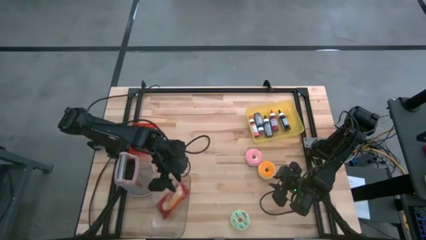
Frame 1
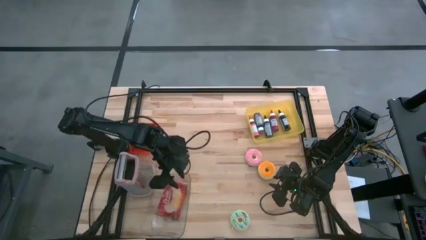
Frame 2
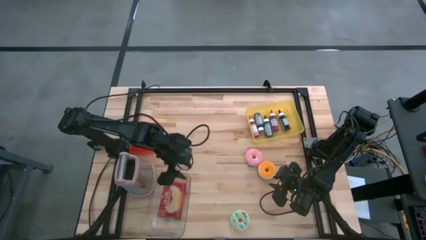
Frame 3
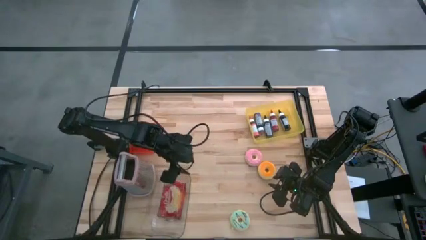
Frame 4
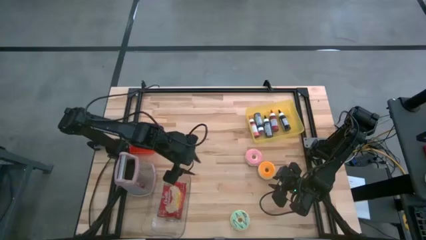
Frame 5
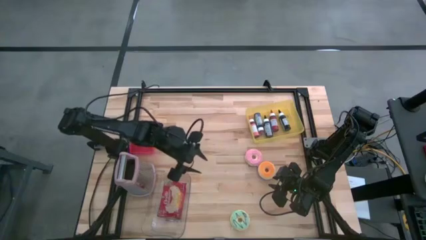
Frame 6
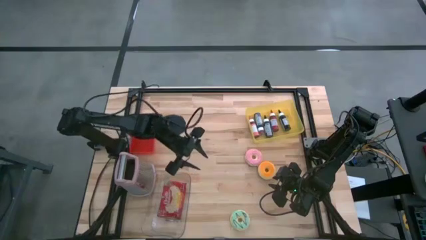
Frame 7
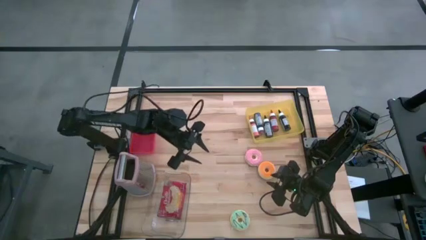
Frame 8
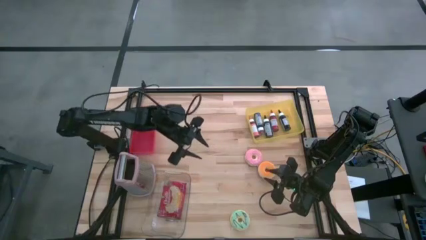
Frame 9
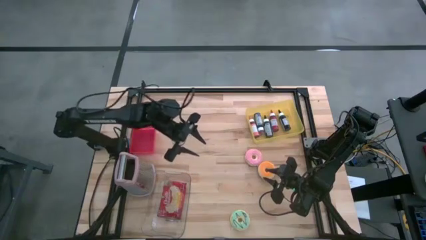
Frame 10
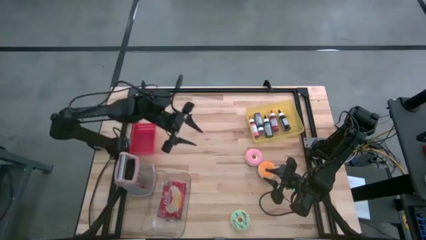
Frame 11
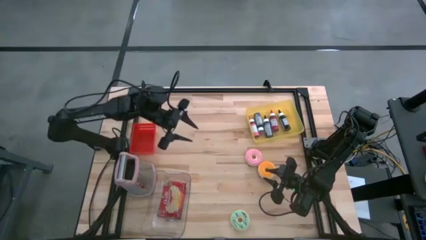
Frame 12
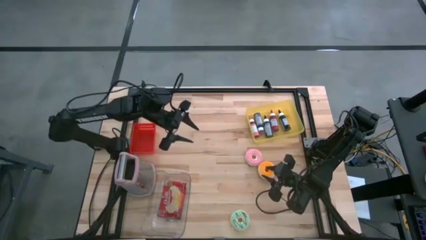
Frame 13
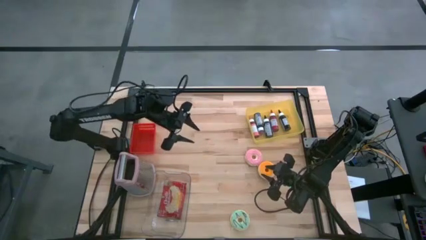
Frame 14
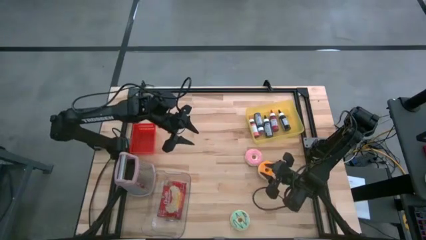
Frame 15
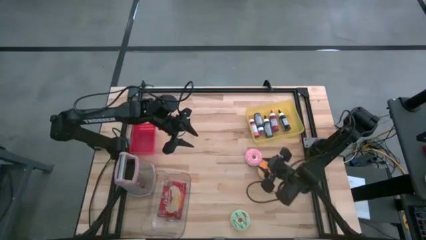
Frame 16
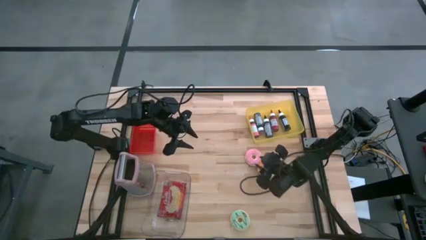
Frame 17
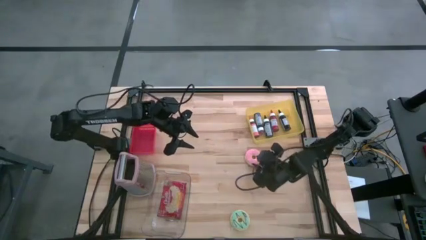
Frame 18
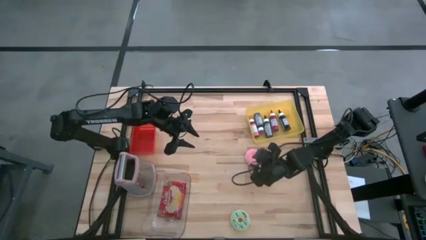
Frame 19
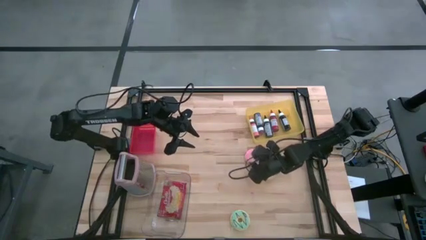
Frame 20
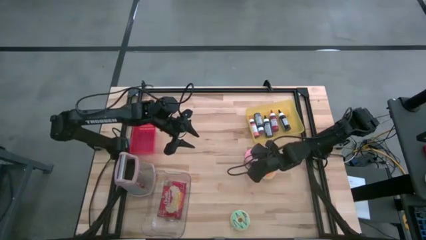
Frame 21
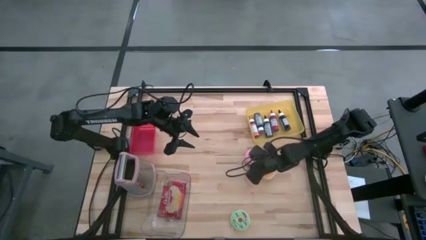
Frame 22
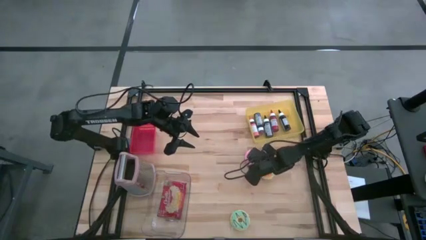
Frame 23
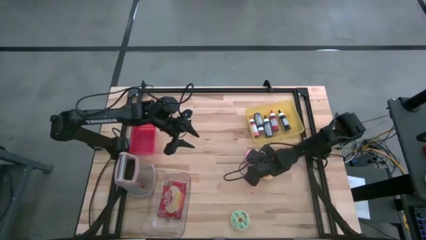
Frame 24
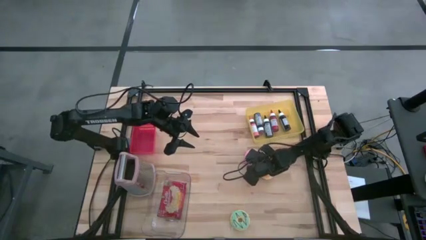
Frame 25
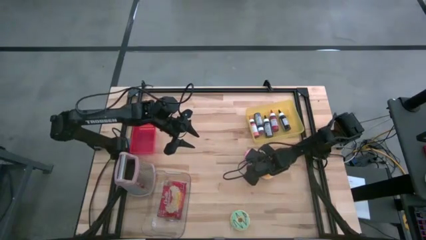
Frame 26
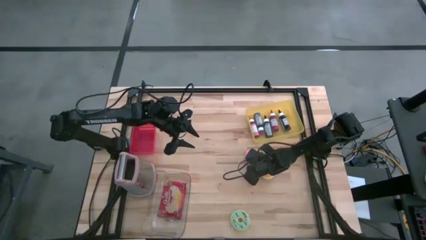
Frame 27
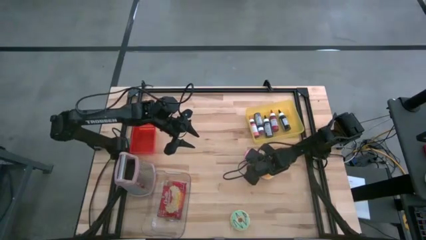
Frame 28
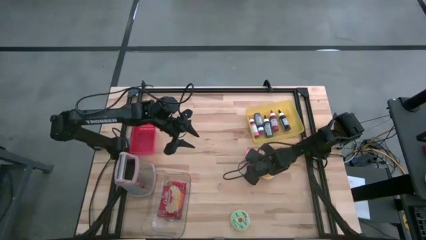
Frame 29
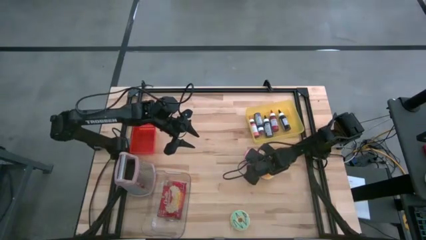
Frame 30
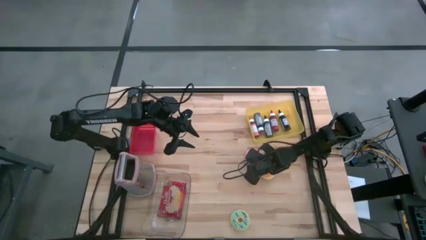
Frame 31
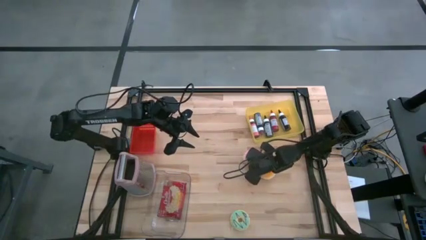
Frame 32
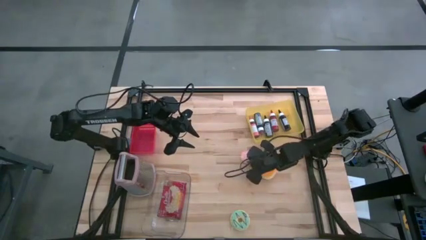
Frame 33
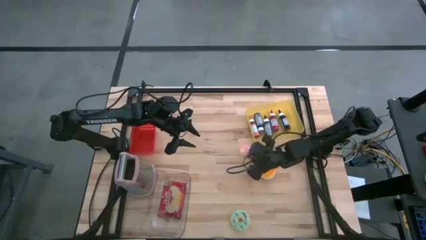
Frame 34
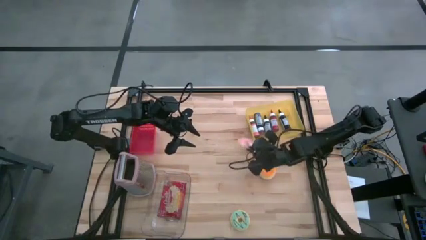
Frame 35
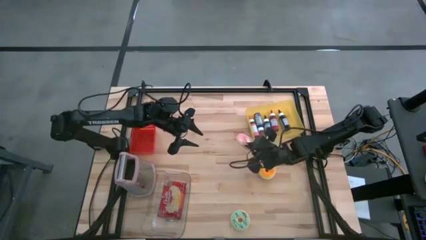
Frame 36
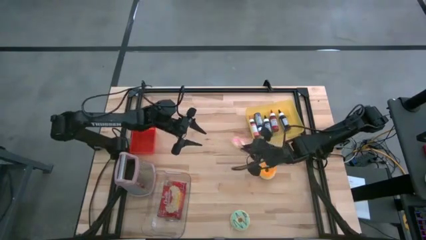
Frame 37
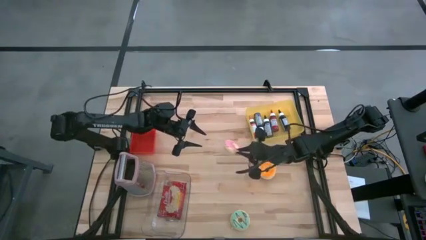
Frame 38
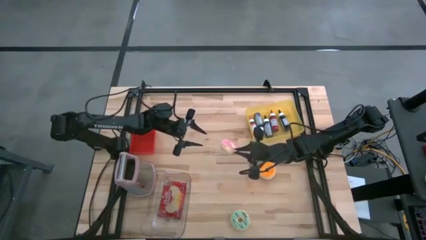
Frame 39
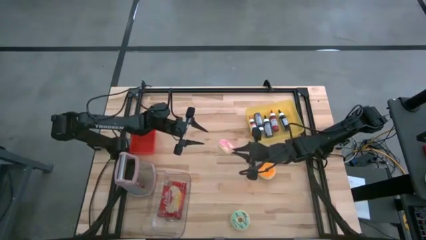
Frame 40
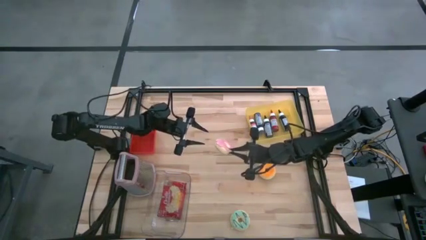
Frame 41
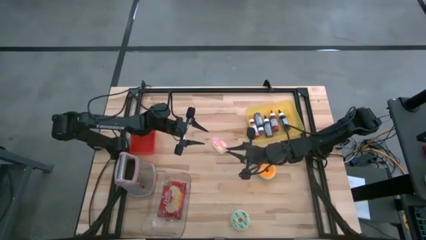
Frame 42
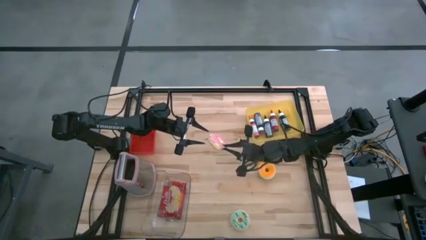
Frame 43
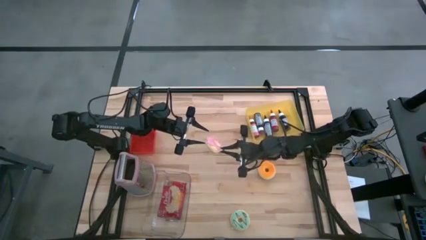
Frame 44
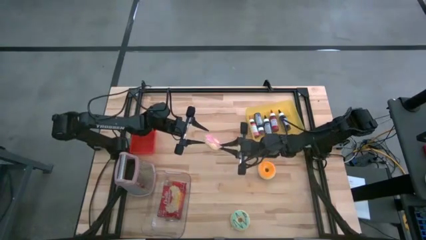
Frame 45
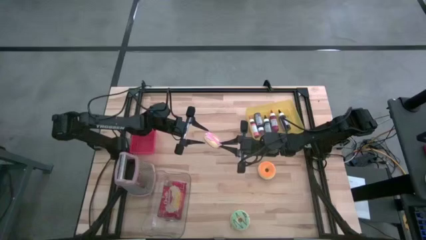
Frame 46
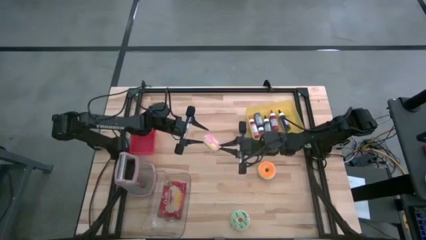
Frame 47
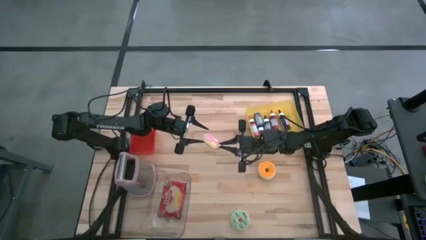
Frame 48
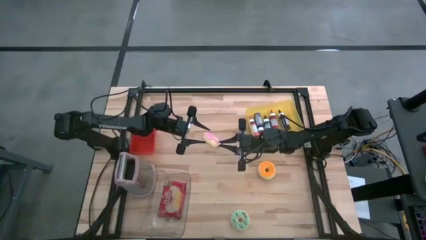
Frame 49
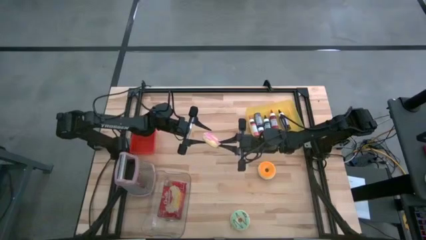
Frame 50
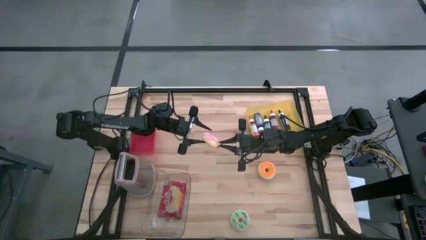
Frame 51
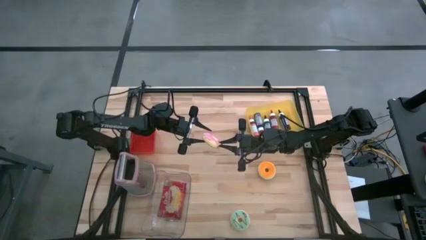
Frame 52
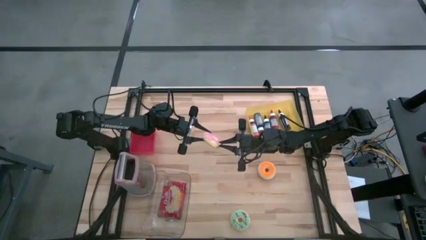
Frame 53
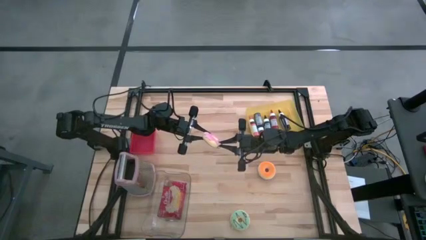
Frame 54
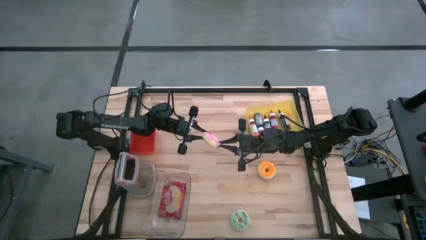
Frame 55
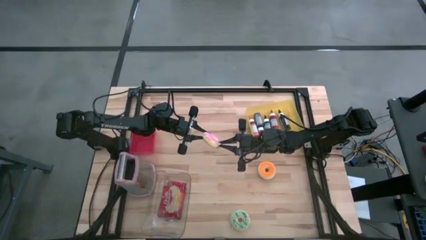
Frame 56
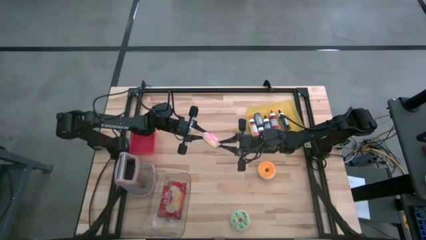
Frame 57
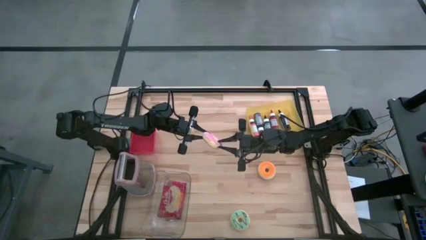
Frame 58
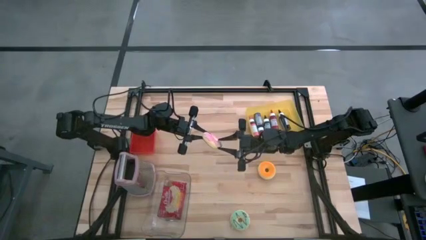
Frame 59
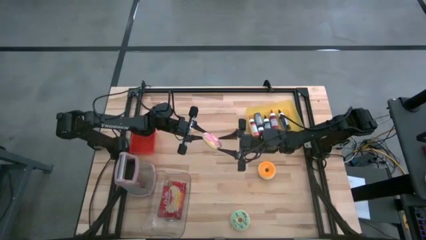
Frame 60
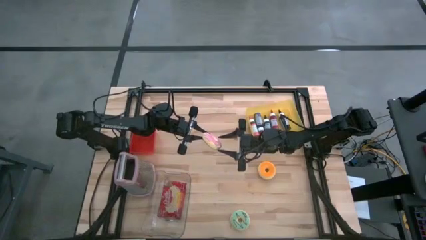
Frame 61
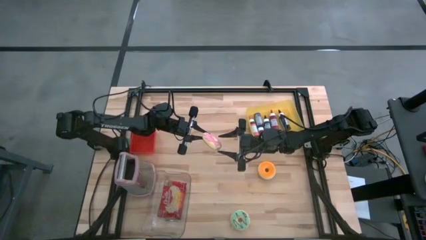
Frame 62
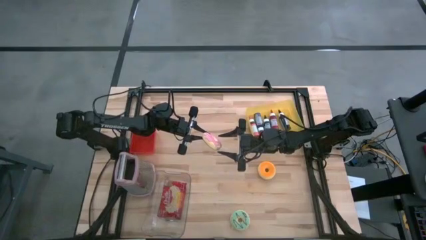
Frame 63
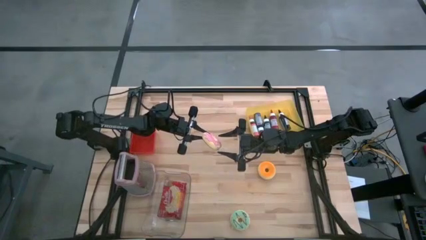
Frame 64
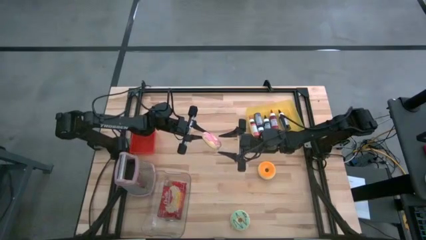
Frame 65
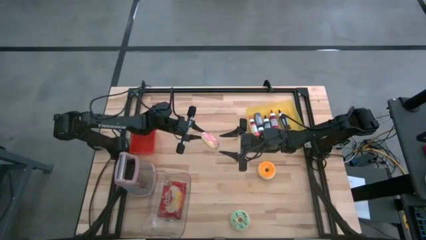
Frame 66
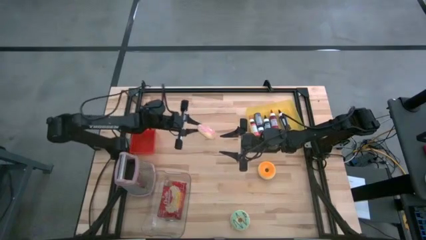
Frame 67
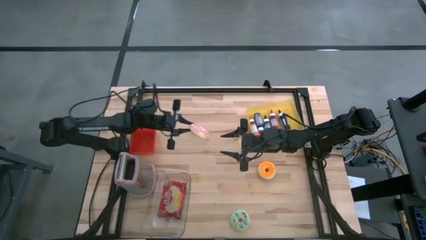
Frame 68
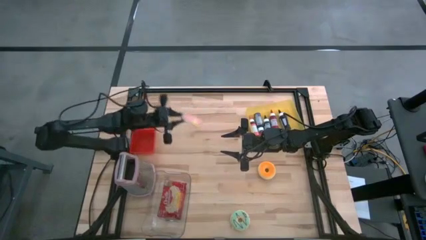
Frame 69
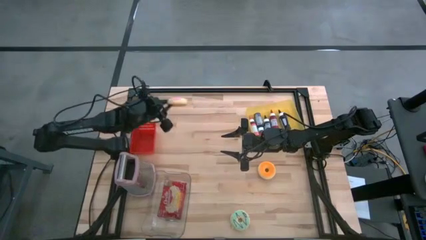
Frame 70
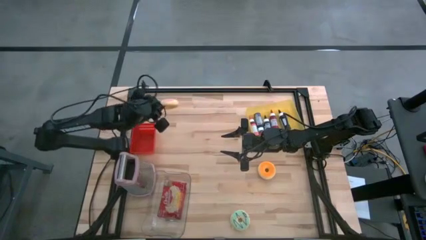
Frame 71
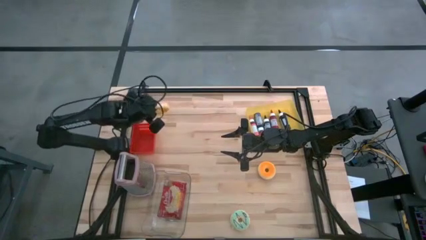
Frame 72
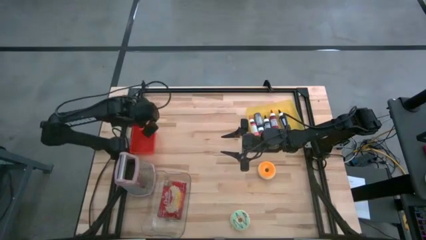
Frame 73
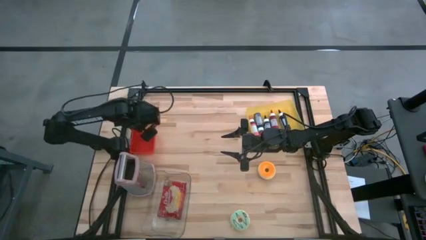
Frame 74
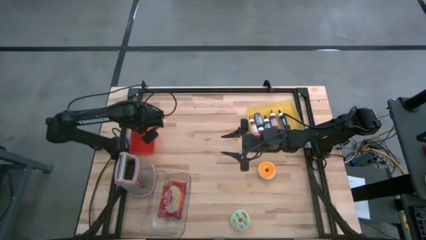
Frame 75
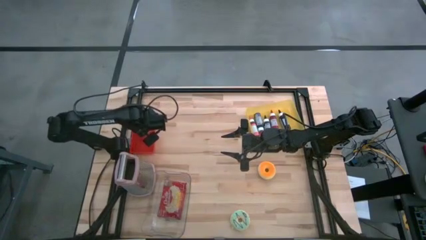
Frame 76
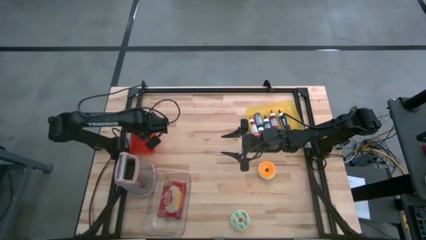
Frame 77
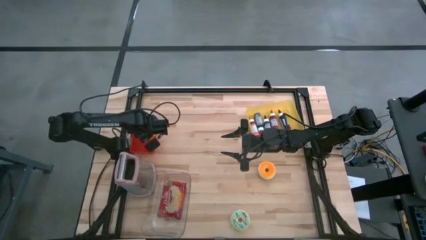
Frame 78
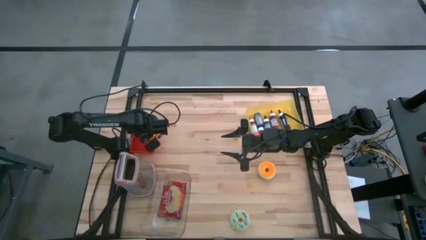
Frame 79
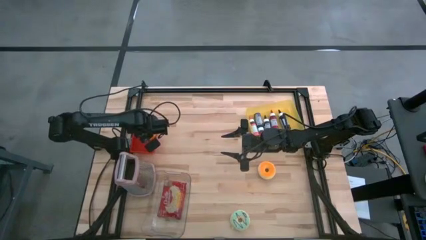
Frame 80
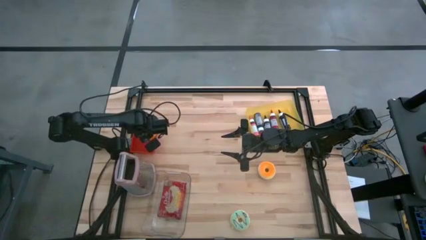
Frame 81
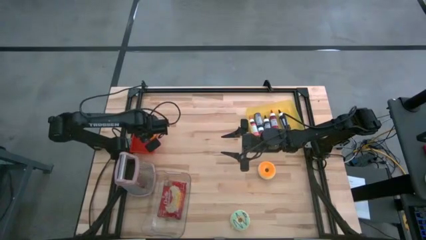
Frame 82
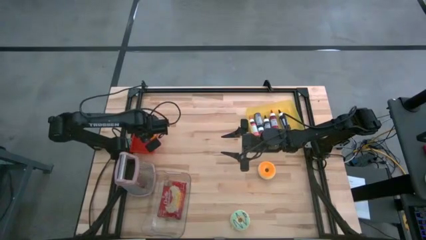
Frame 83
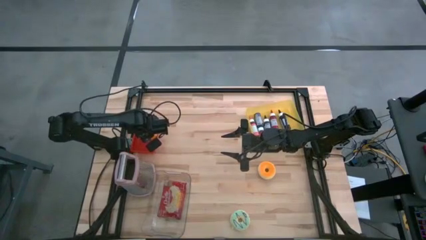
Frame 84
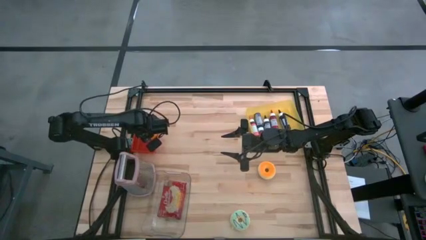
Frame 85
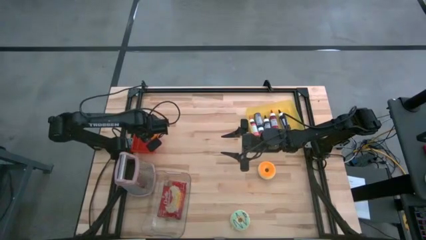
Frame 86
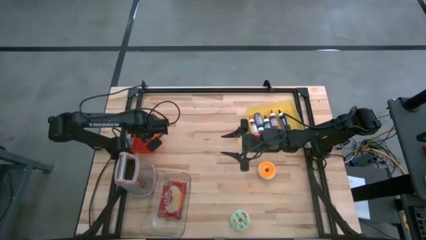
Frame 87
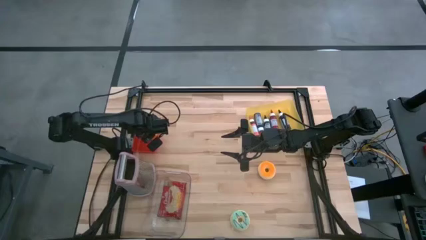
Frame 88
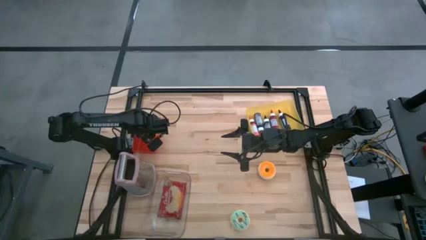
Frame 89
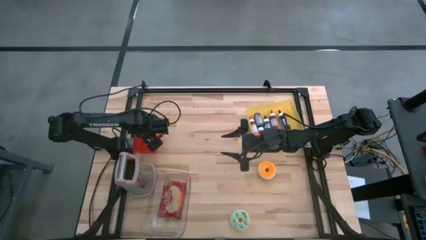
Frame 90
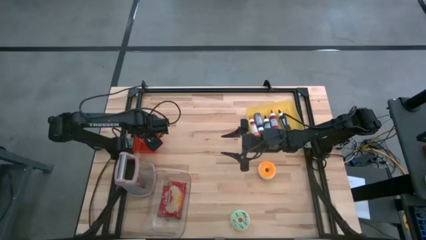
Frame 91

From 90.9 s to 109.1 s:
Task: Pick & Place Food Item
Put the pink donut into the red bin
